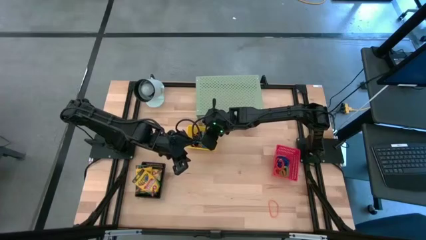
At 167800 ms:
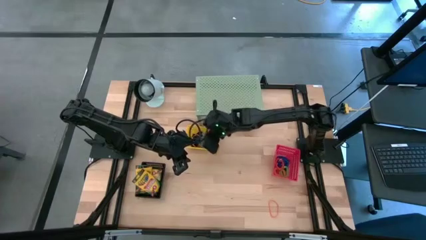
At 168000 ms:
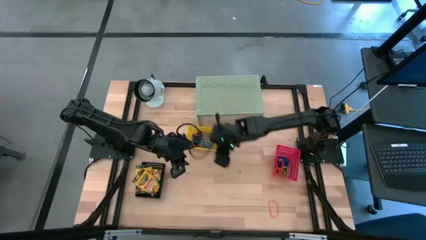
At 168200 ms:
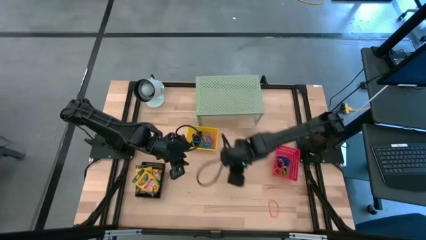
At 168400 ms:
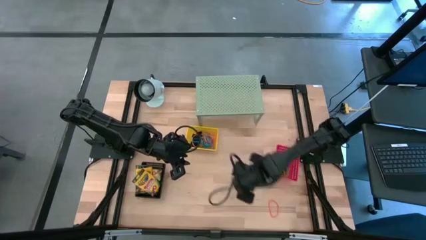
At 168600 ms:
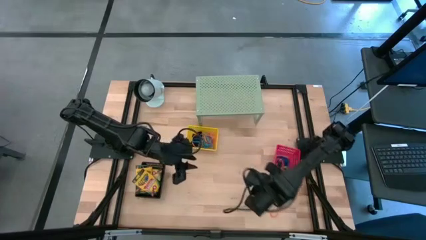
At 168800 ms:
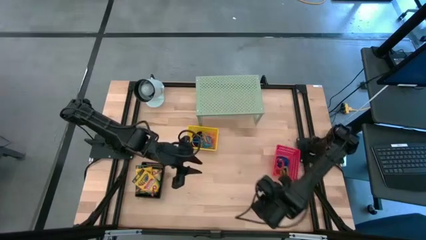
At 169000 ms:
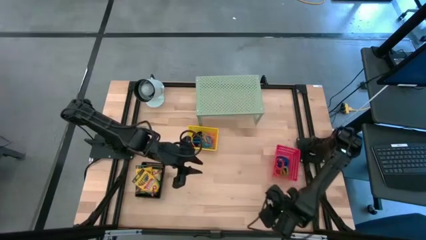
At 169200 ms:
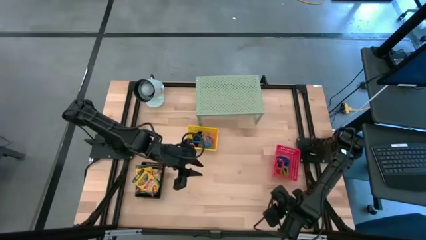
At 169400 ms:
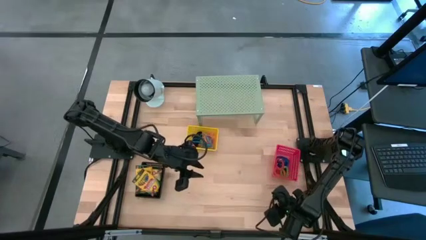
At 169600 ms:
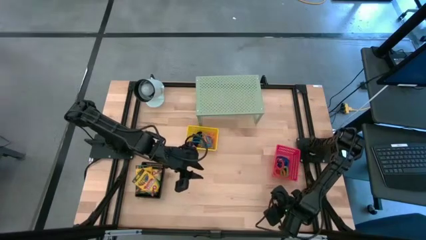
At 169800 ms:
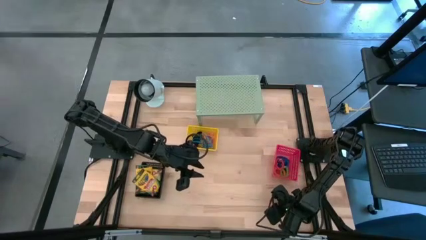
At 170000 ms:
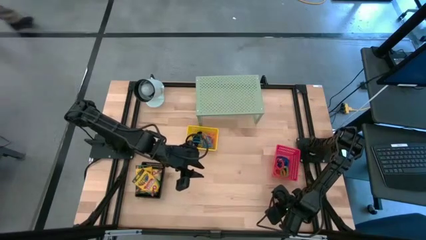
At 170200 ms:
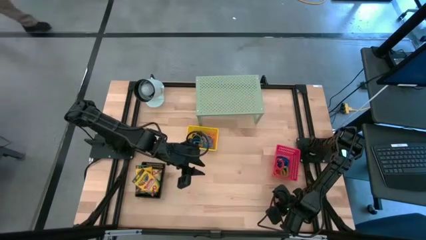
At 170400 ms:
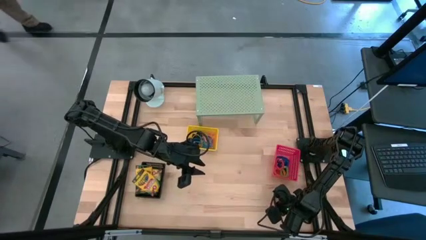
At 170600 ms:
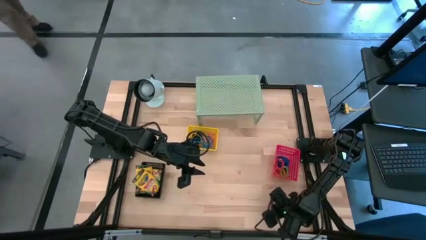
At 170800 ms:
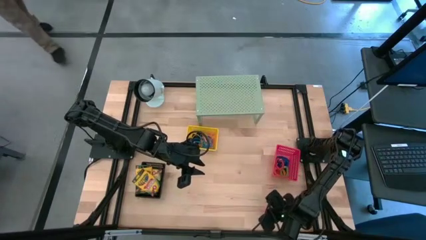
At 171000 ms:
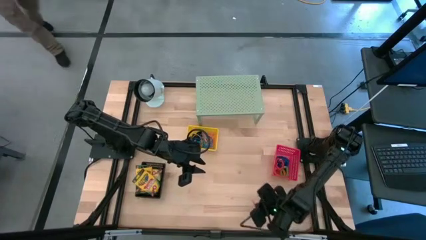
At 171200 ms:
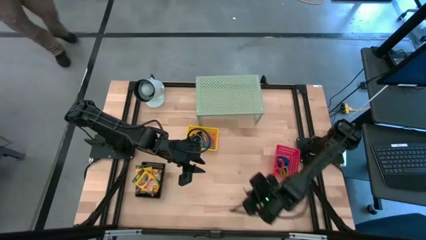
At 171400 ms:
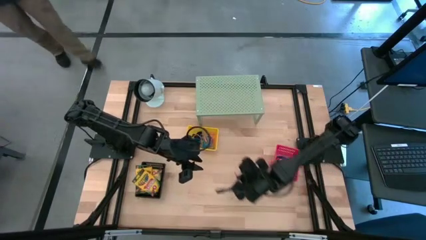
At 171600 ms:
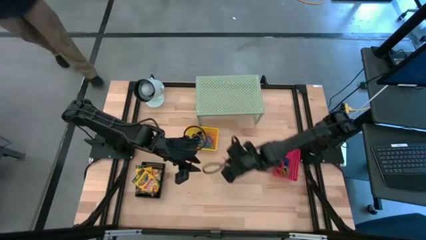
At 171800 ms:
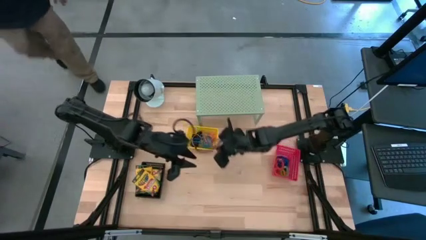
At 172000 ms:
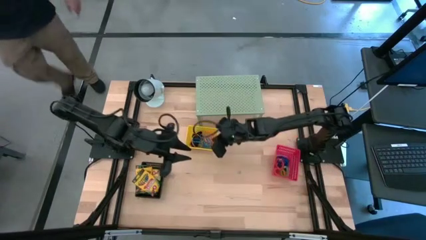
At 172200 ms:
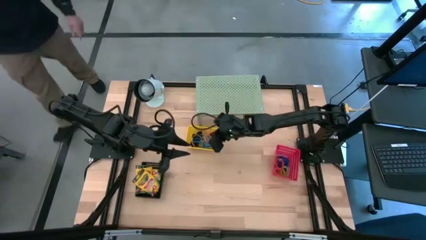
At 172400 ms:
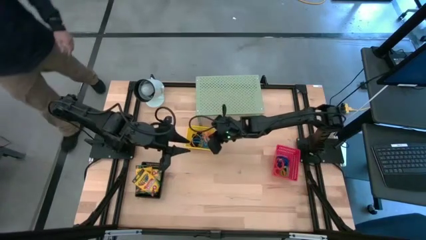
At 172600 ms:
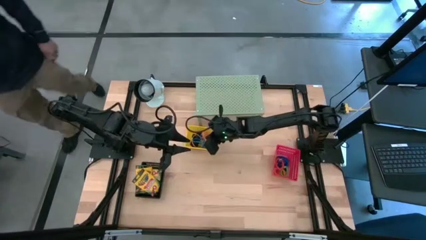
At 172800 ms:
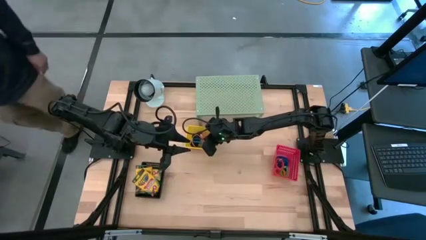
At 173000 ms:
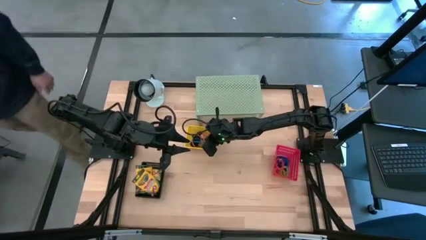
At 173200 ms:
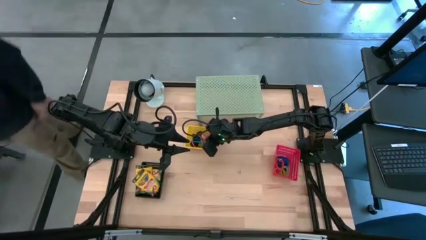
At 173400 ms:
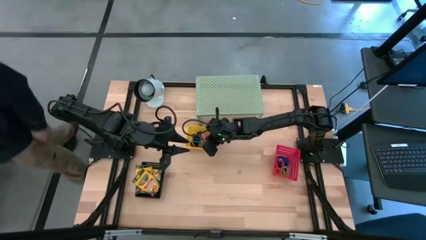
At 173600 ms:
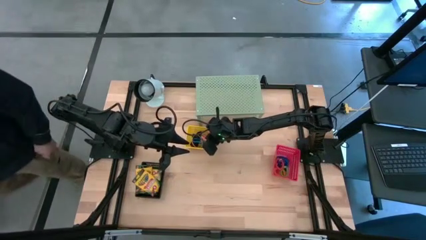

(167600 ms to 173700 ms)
Task: Pick & Place Office Desk Supplies
Put the orange rubber band into the yellow bin

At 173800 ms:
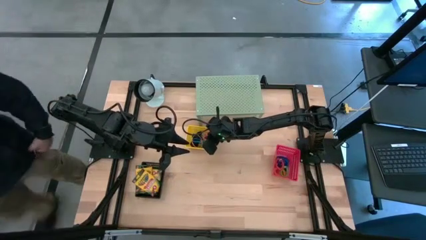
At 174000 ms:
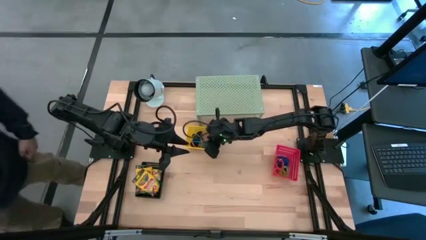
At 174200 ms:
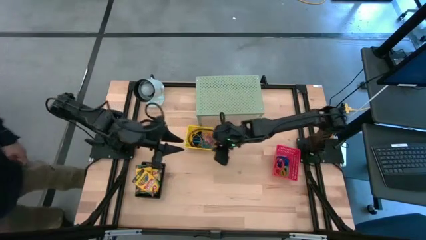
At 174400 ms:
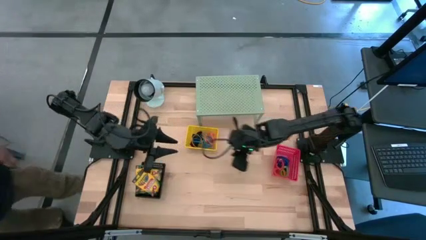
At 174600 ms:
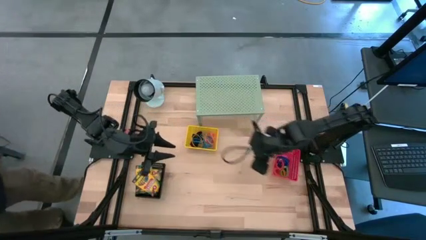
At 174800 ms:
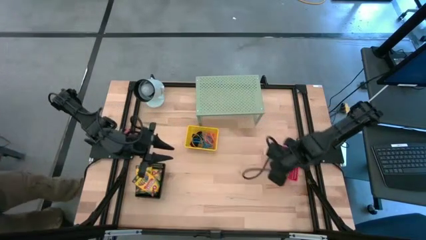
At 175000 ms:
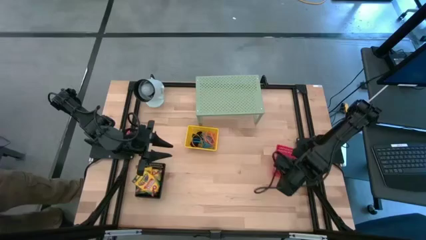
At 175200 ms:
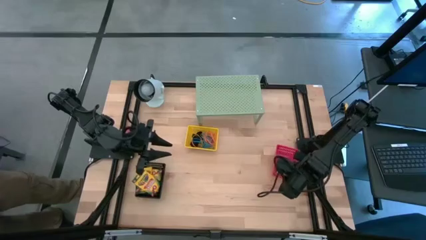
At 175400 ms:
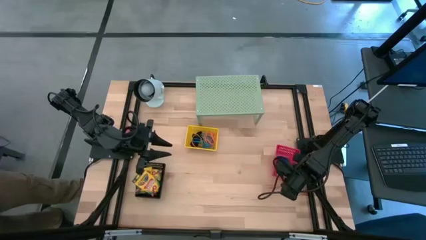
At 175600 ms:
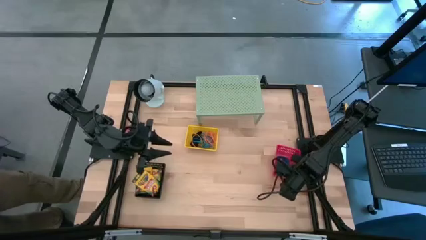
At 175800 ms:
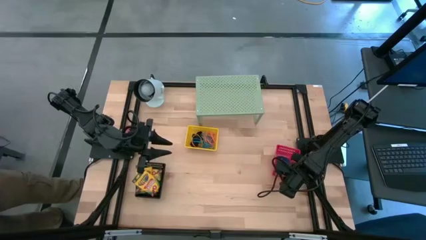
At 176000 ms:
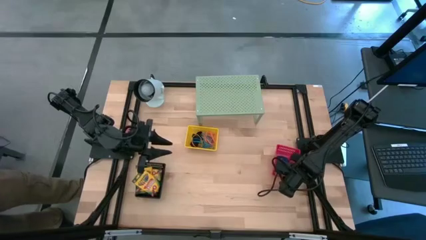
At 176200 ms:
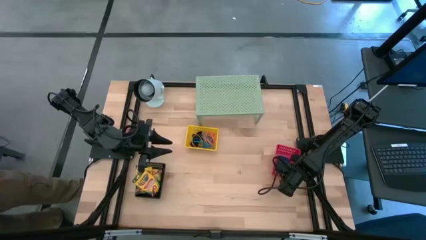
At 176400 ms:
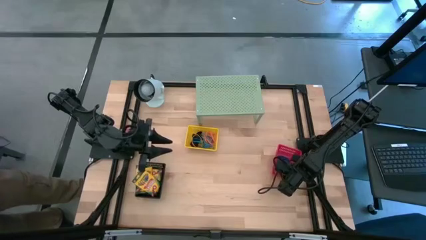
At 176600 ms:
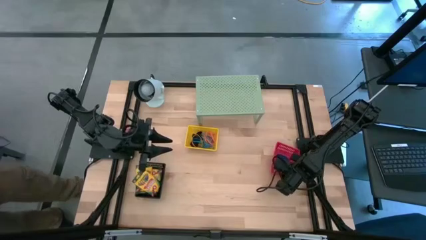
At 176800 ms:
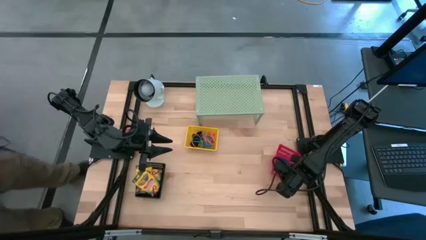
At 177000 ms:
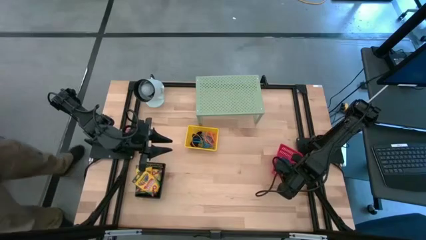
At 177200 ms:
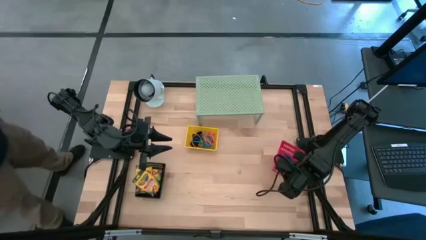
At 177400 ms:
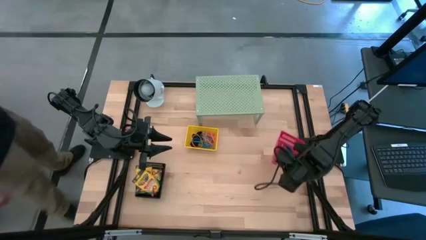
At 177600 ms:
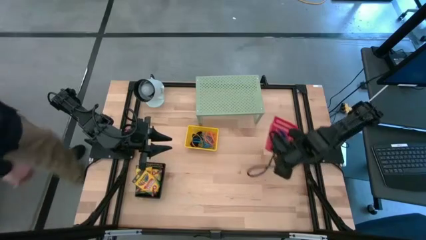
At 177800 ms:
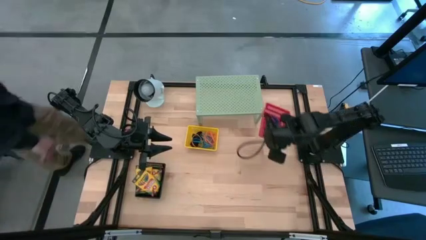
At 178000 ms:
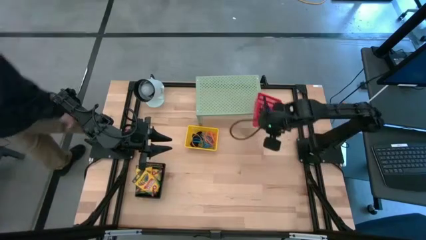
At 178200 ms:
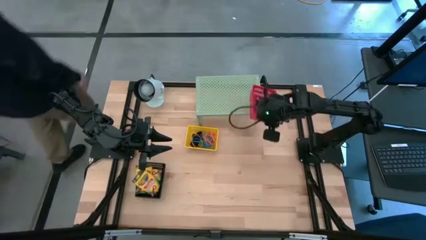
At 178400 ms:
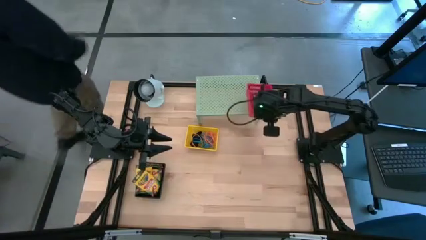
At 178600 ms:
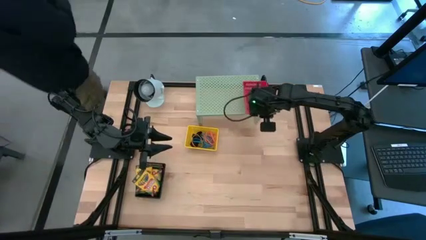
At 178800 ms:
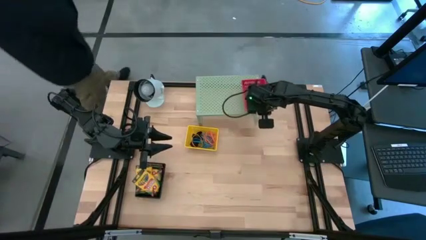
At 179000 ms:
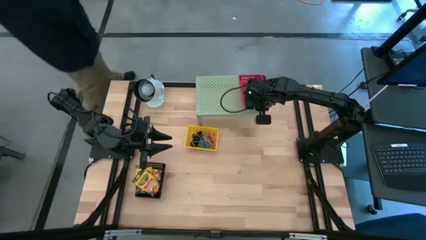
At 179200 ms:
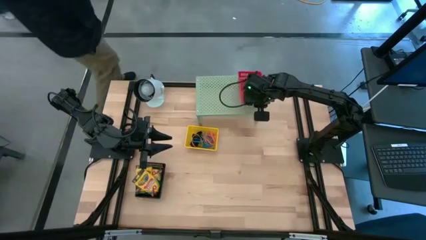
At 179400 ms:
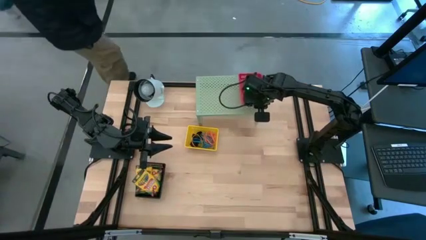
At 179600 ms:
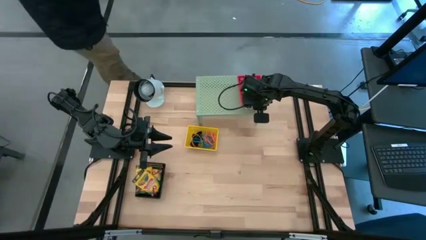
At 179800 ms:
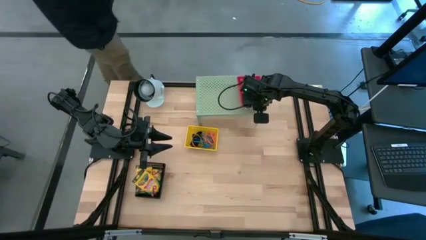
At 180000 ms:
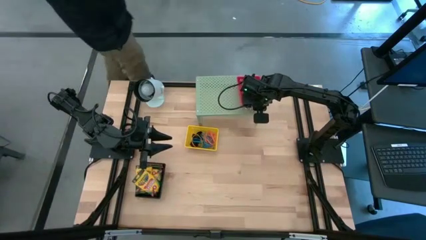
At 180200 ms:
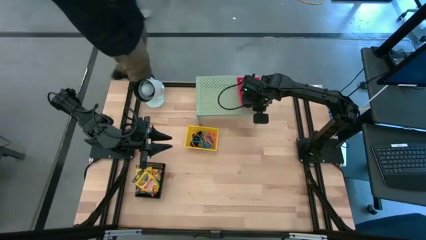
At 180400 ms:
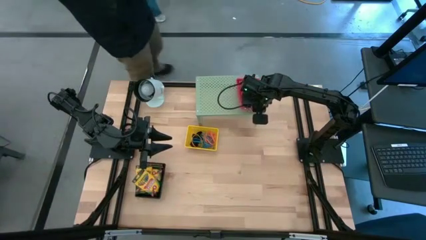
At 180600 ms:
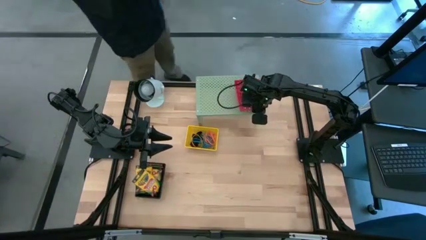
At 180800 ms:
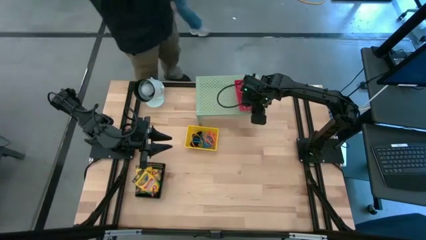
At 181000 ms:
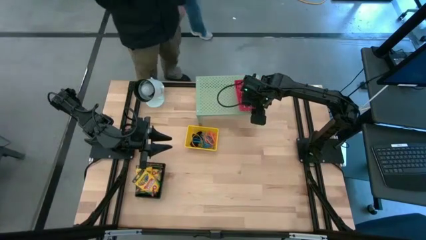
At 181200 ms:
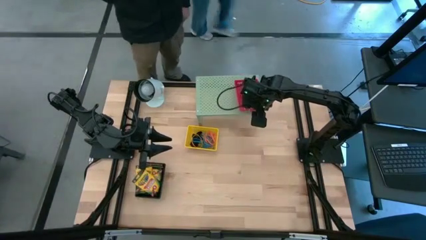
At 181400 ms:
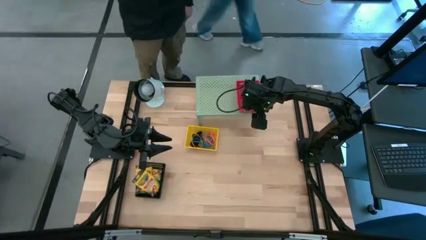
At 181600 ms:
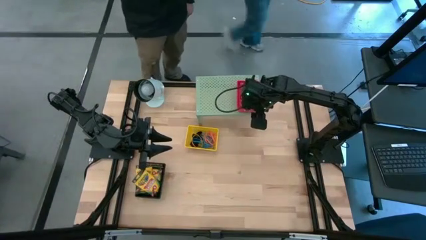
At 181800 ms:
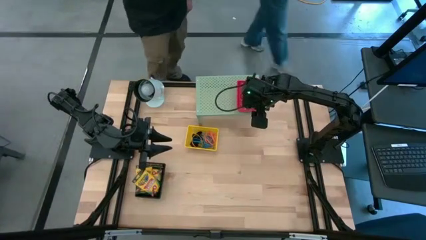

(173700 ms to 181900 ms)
Put the red bin on the shelf

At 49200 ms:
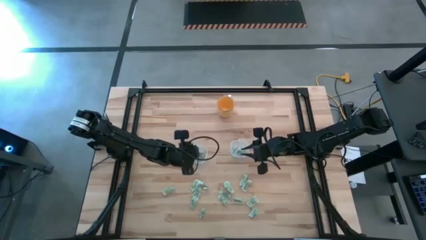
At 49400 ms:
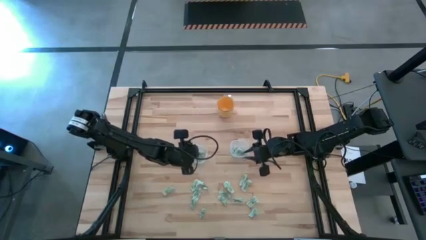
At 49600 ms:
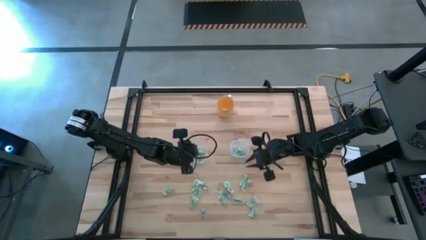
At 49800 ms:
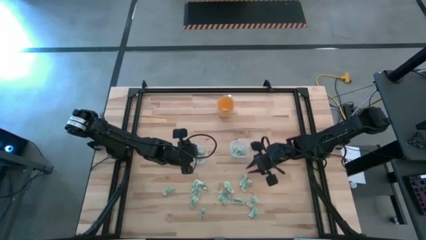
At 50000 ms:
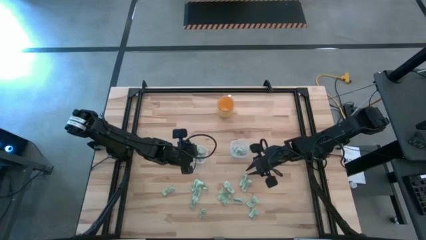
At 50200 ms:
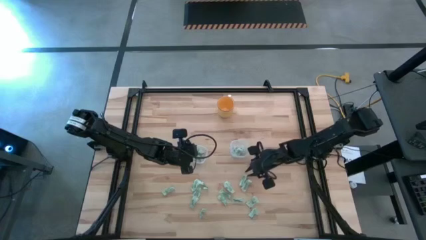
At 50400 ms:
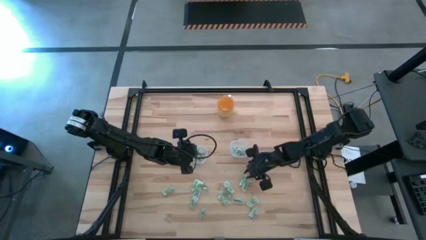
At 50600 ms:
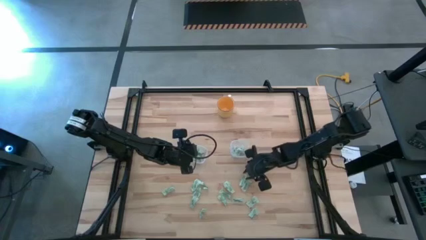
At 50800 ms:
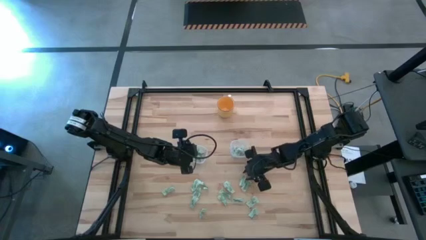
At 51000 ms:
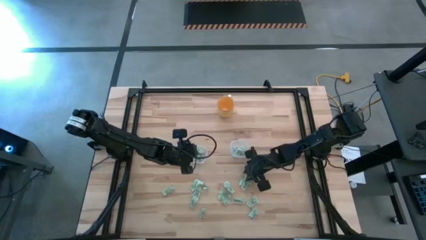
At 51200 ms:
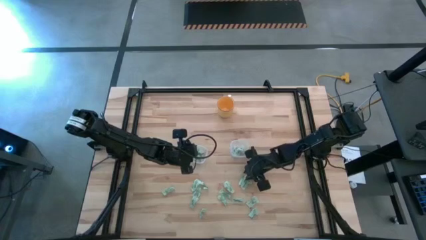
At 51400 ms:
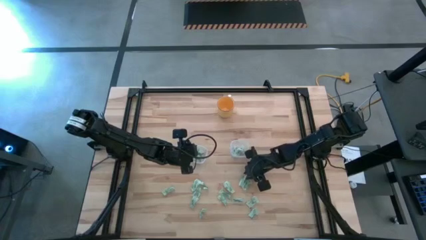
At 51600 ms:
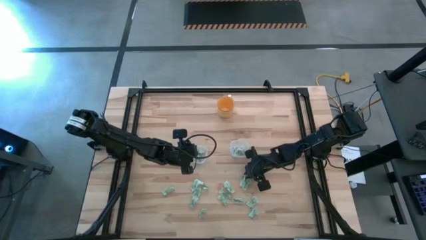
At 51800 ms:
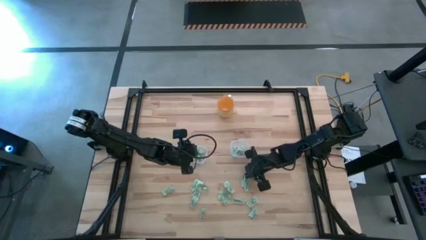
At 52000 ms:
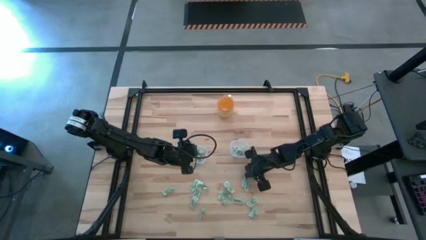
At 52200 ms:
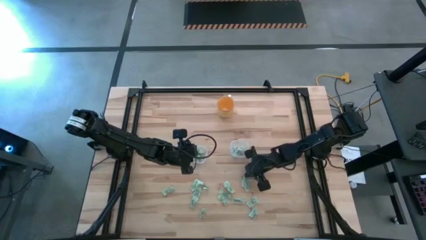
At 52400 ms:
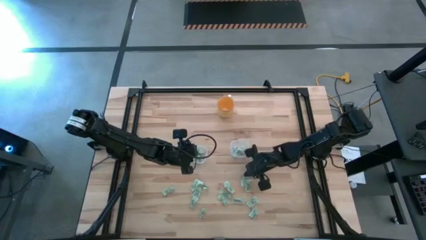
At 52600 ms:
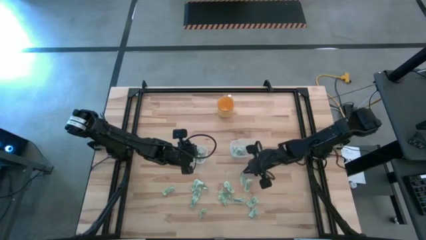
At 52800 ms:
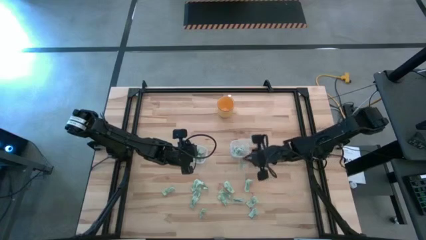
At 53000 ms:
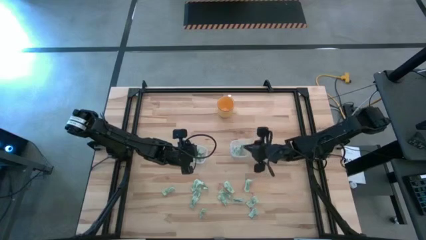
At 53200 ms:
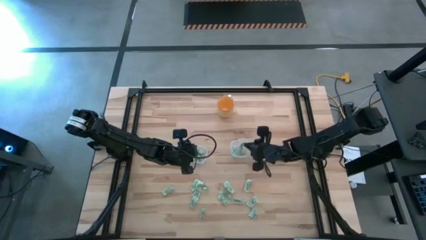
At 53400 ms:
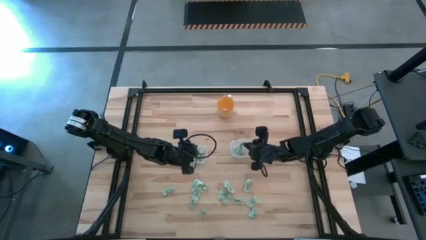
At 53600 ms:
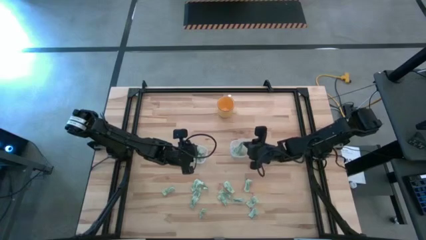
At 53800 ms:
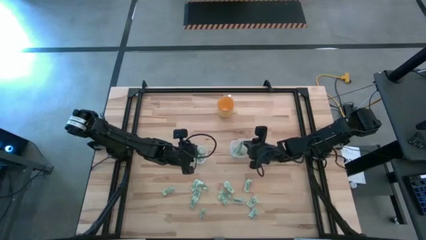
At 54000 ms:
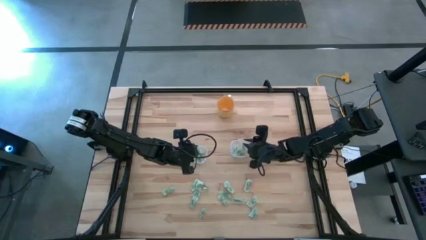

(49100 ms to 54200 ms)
Task: Pick and place items into bin
Put the green sweetener bag into the right transparent food container
